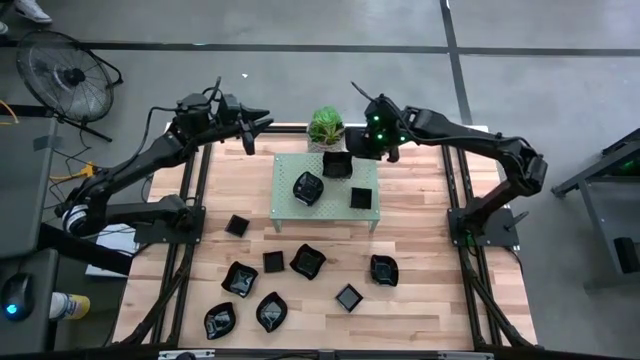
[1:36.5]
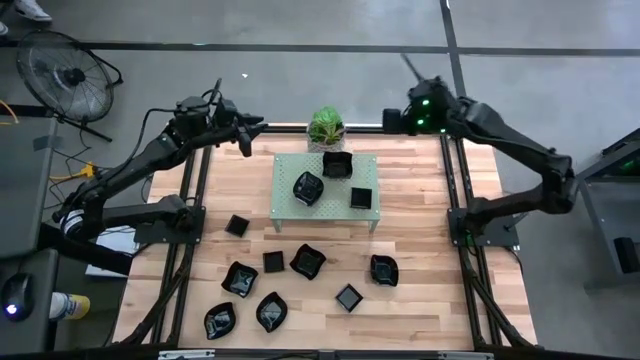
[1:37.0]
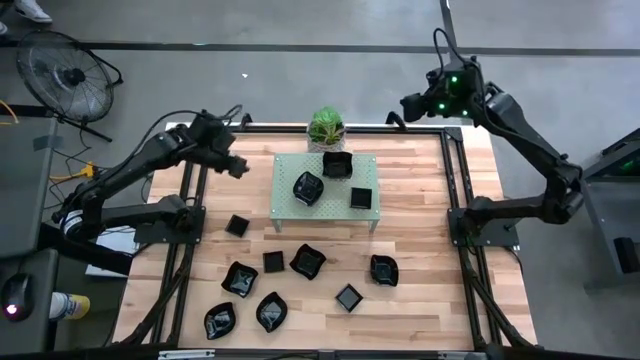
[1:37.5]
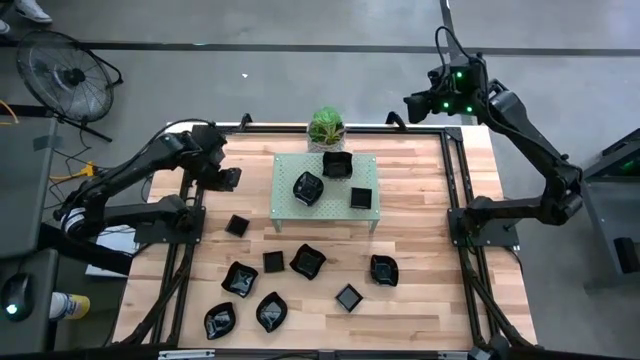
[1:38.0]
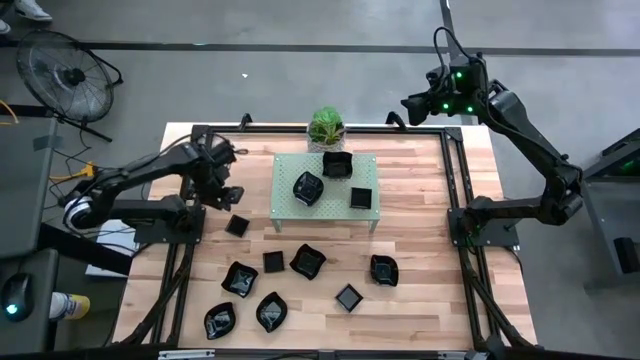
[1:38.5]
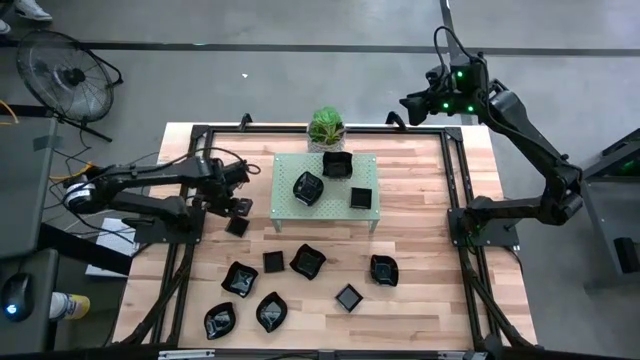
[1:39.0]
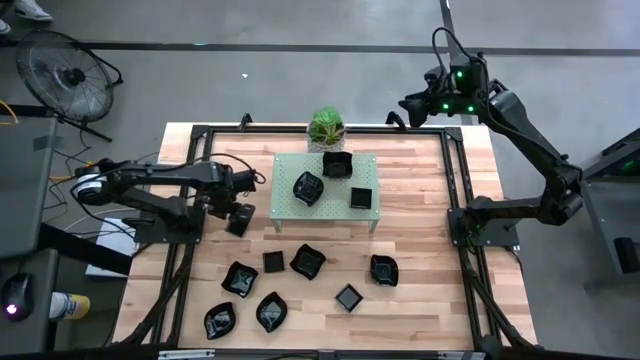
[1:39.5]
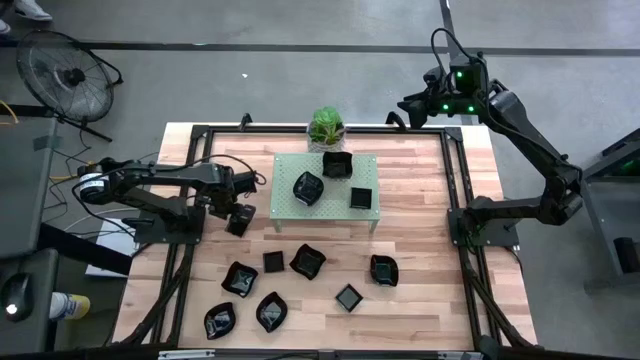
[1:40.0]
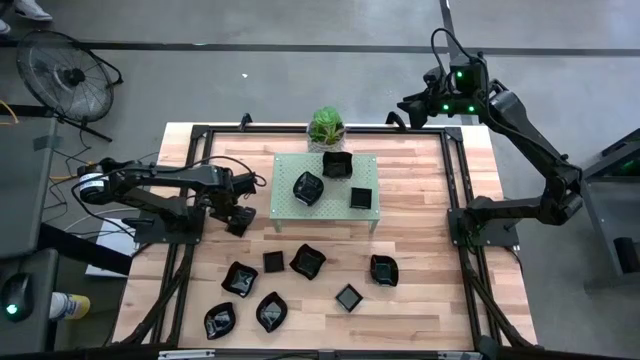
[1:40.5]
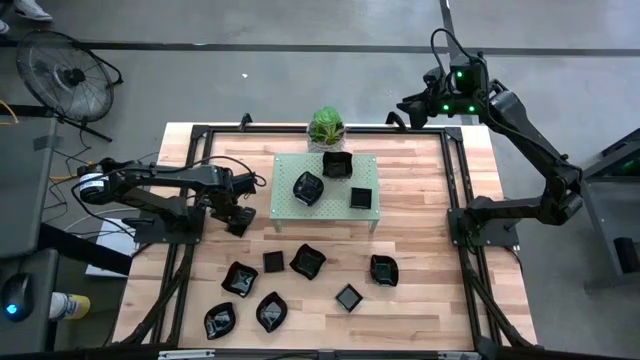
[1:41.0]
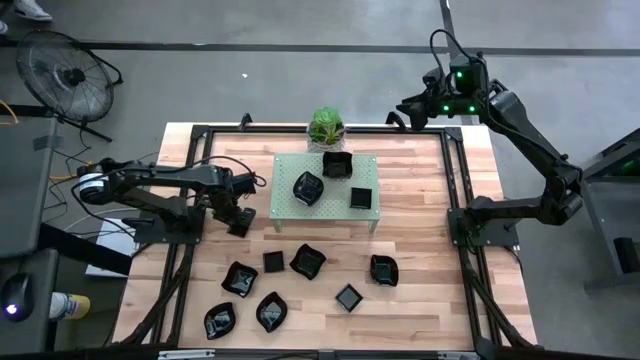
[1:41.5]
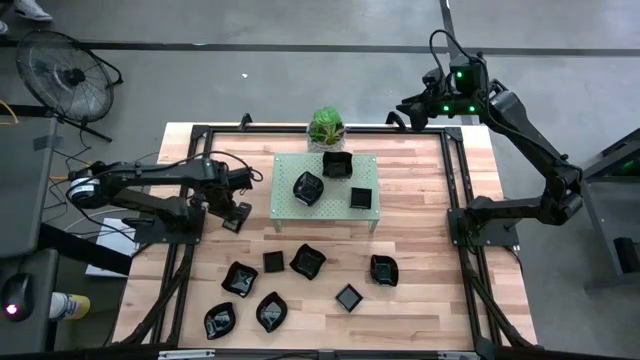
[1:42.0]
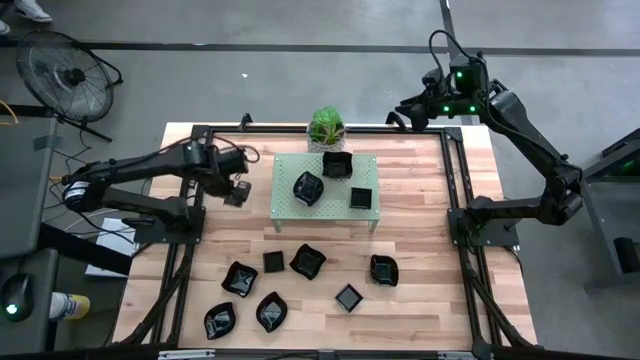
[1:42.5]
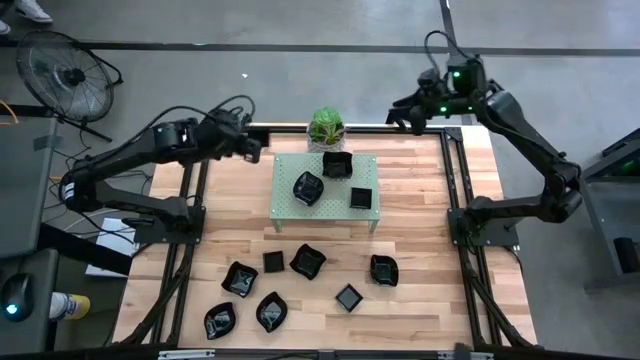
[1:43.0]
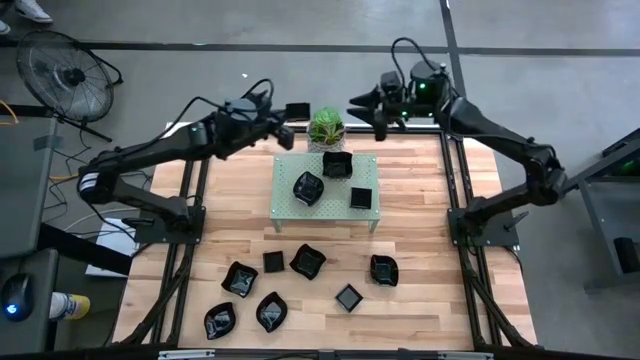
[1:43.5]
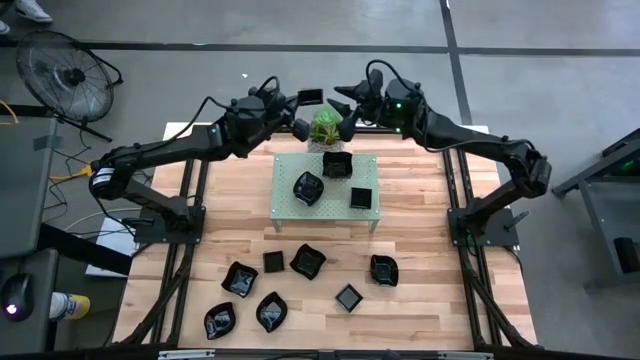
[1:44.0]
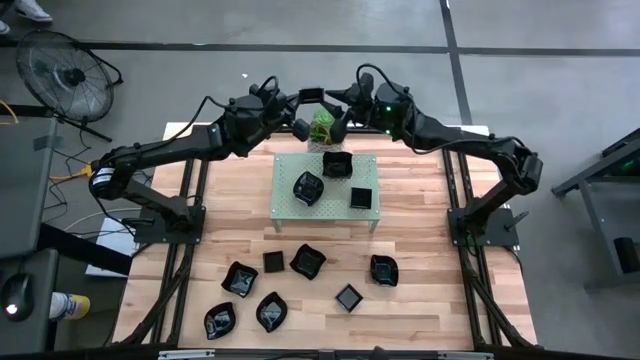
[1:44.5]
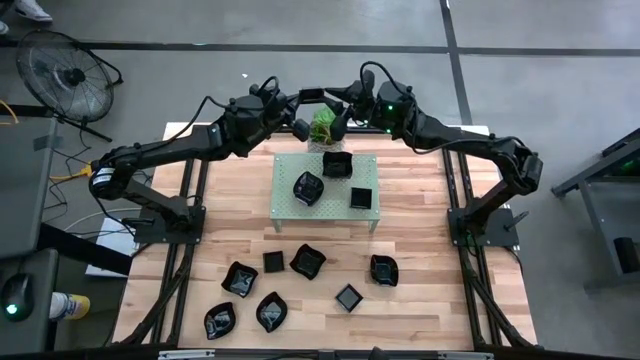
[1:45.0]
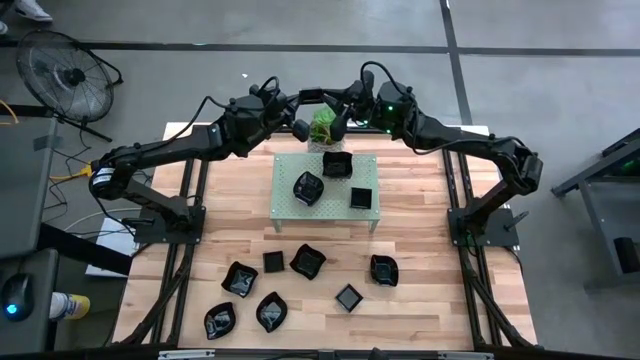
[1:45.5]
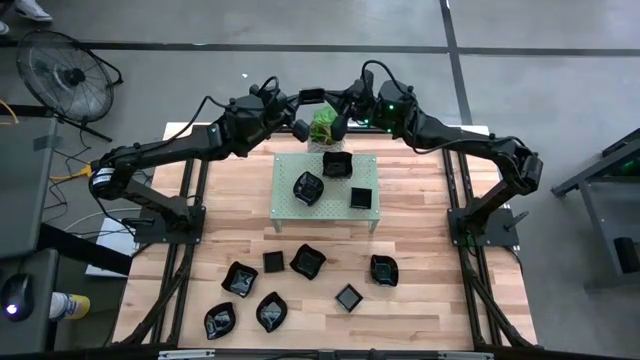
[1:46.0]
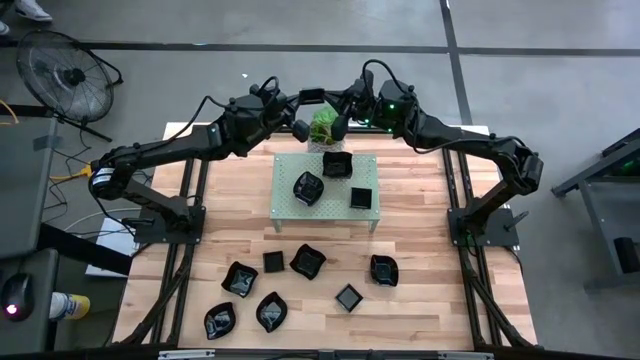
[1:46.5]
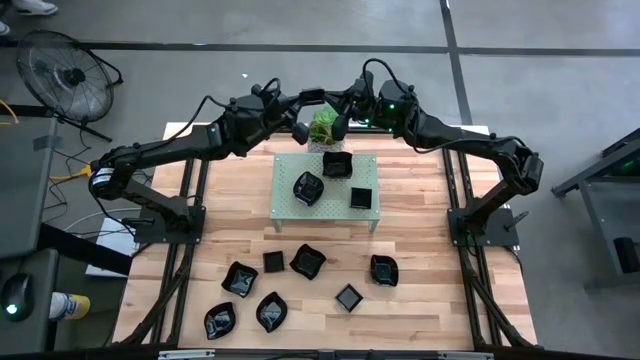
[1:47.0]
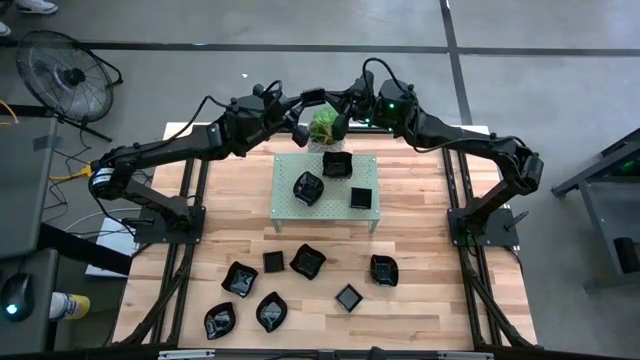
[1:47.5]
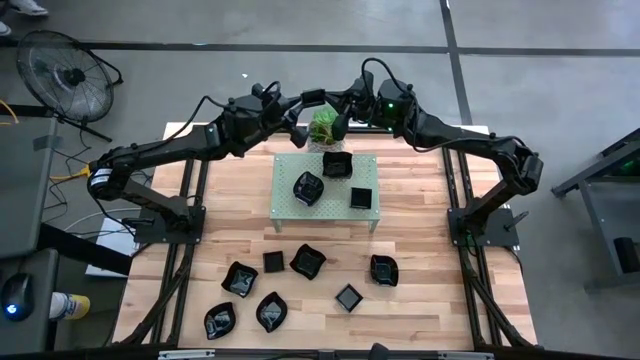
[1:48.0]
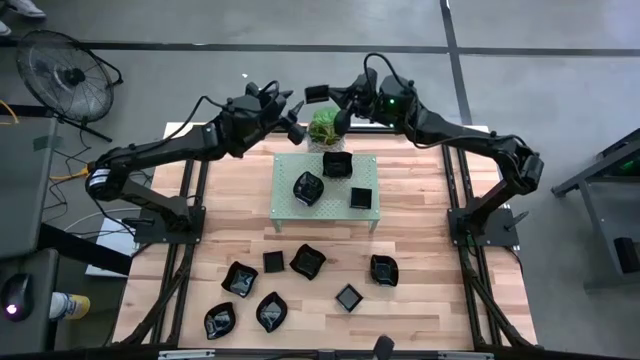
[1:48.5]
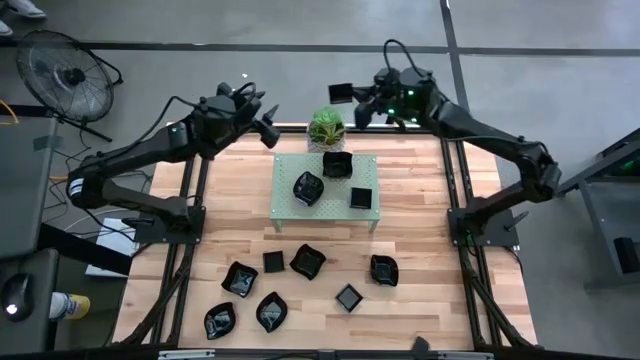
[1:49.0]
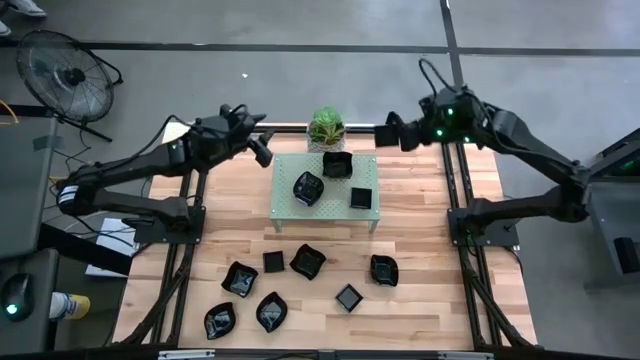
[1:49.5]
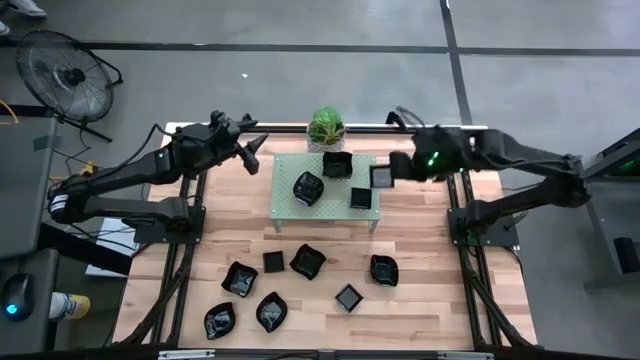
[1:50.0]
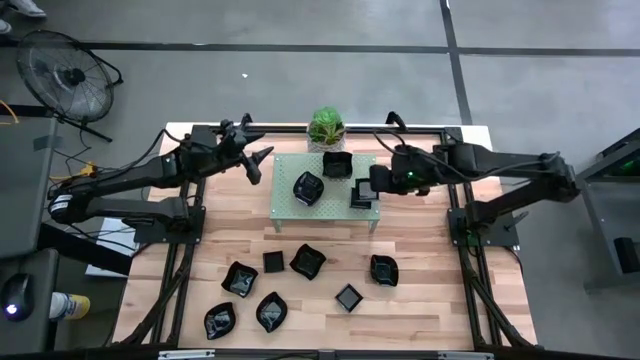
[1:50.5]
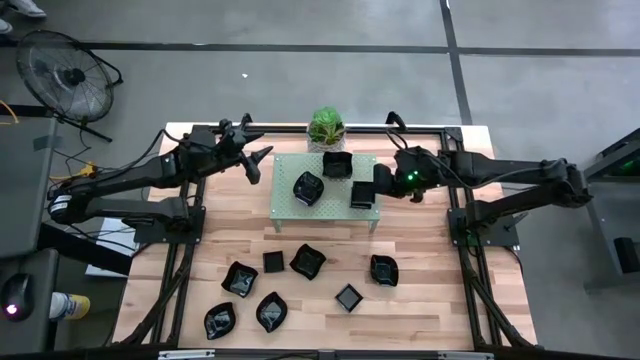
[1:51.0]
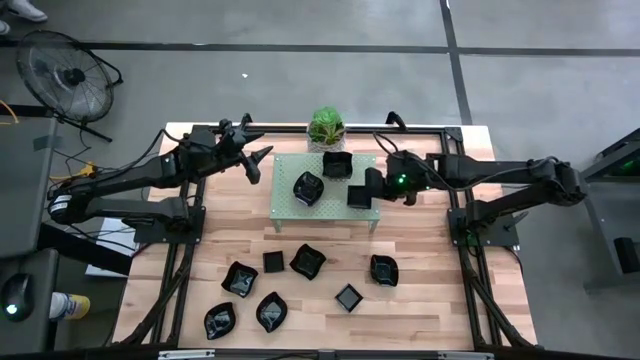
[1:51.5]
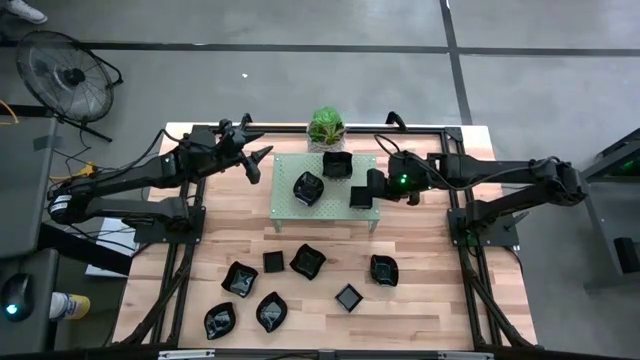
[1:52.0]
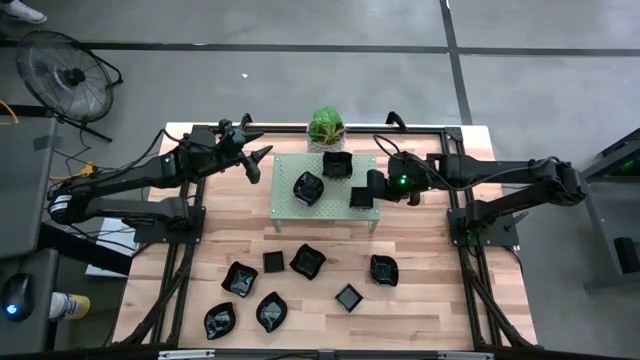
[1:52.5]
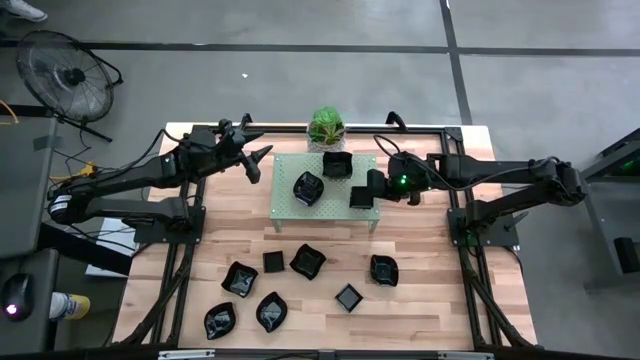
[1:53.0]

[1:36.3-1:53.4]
Task: Pick & Place Mini shaped plates
Stack the black square plate on the other black square plate on the shelf

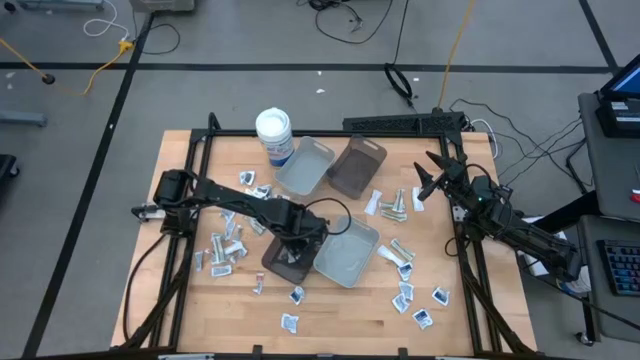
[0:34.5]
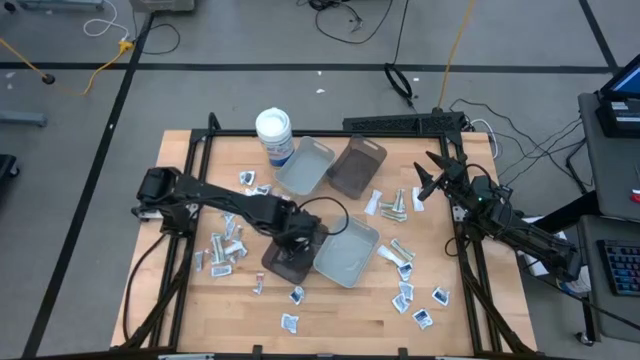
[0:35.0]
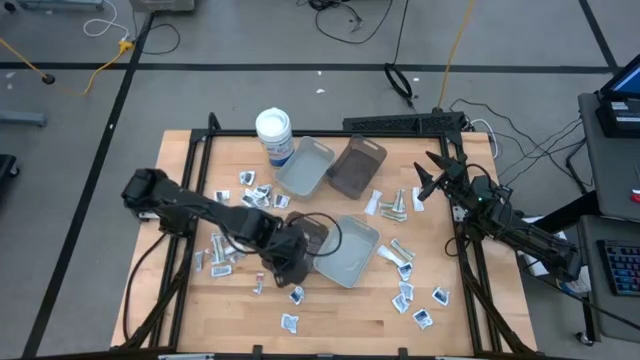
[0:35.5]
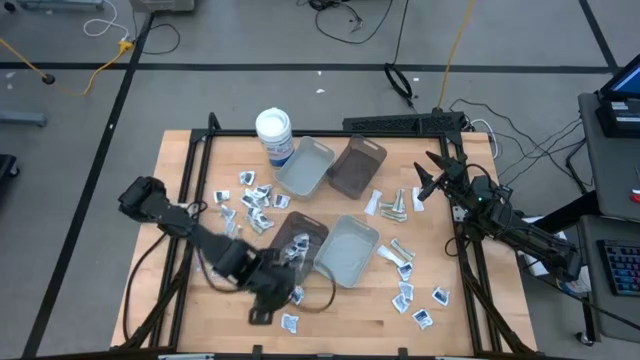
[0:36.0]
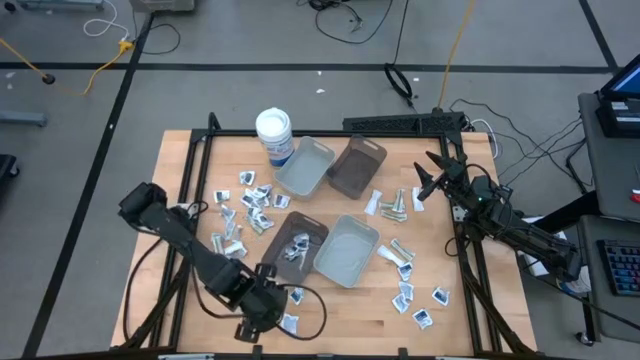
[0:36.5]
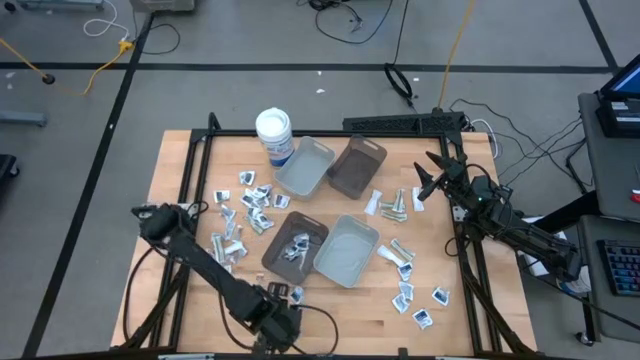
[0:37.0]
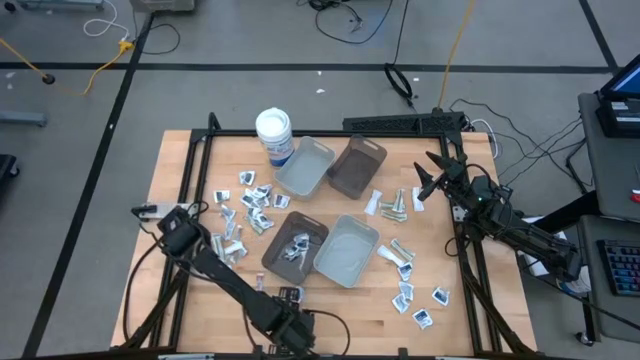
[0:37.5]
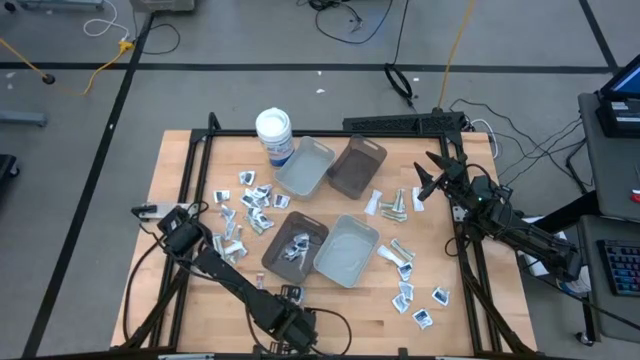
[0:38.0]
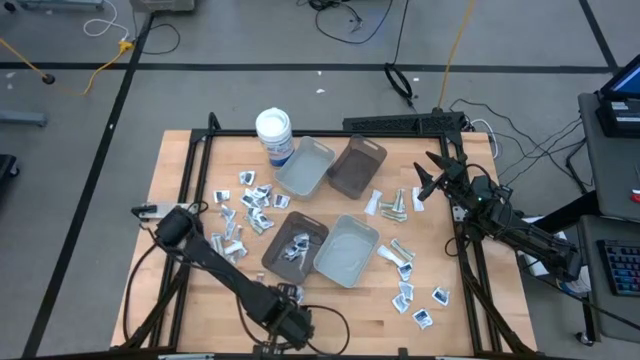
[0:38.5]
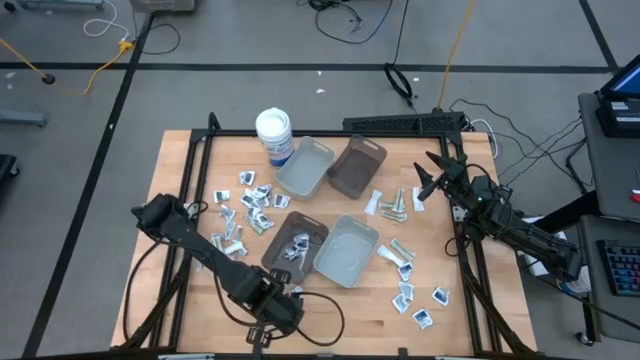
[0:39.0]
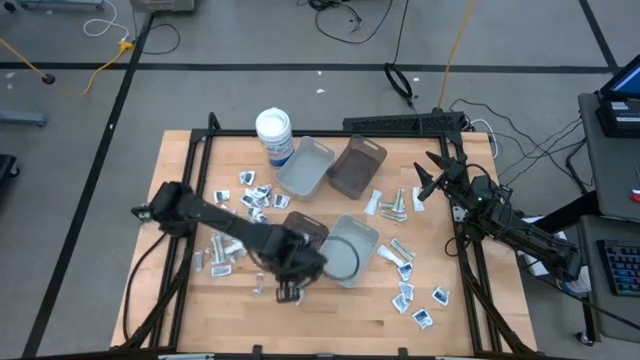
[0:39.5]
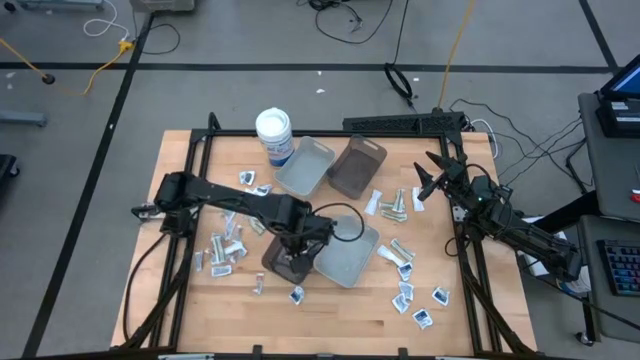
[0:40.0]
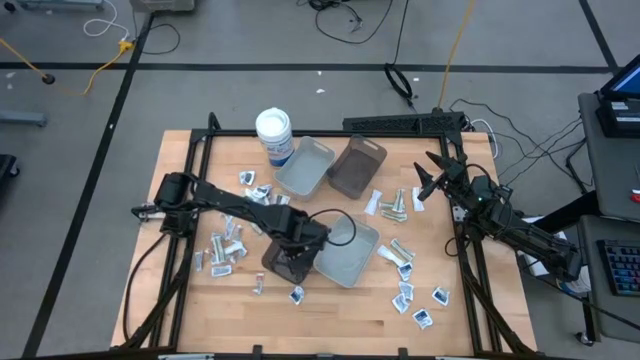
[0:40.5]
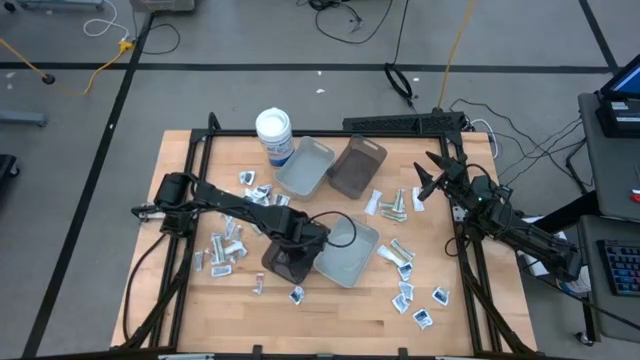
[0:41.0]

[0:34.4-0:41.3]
Task: Pick & Place First Aid Supplies
Put the blue alcohol pad into the bottom black bin
